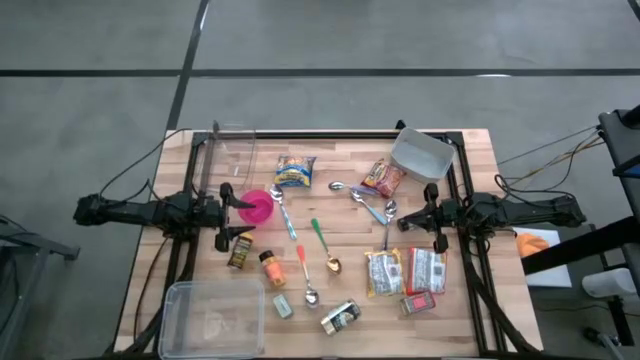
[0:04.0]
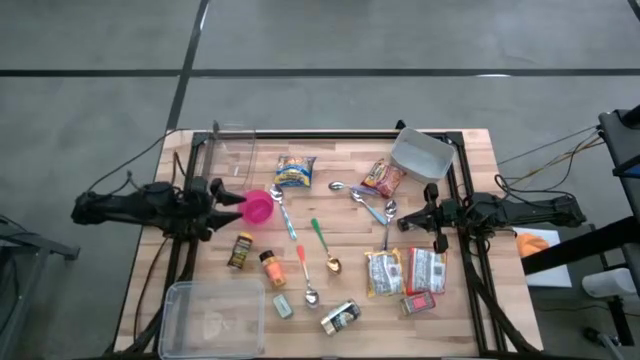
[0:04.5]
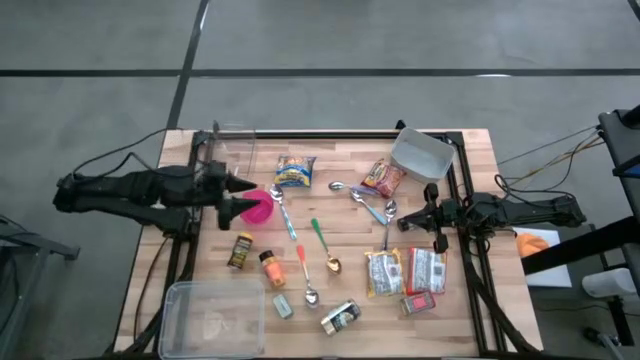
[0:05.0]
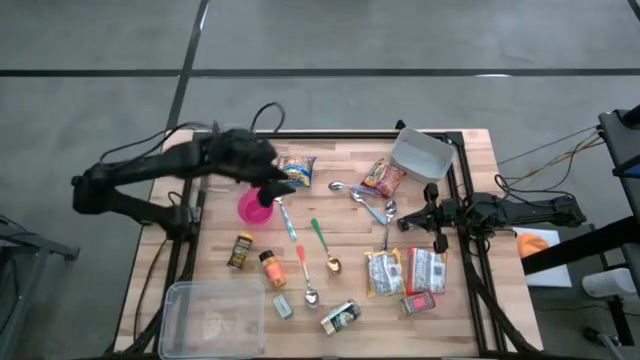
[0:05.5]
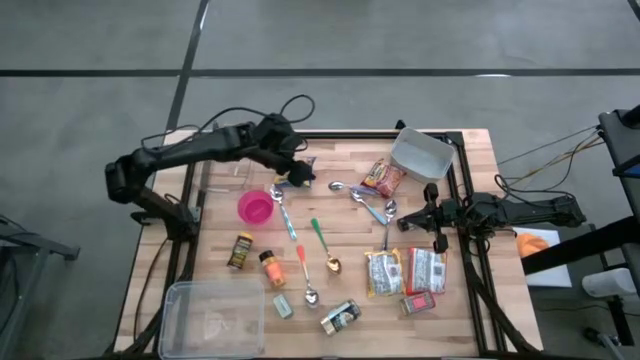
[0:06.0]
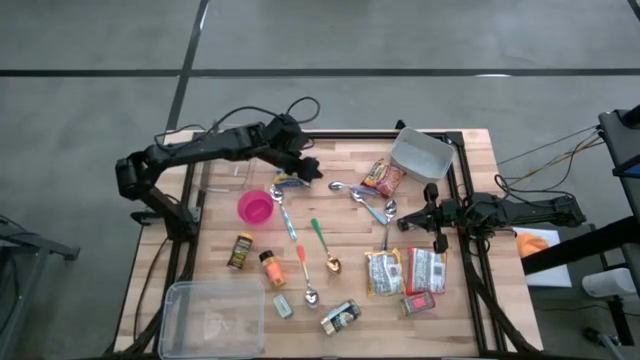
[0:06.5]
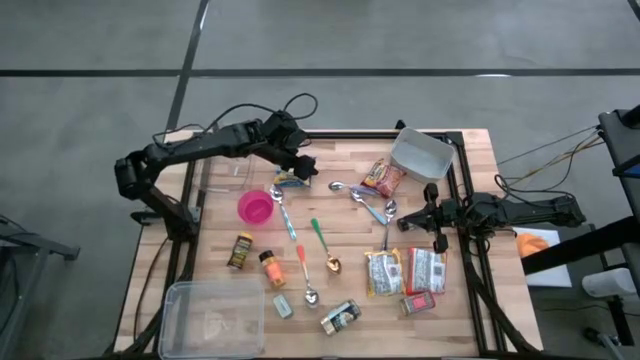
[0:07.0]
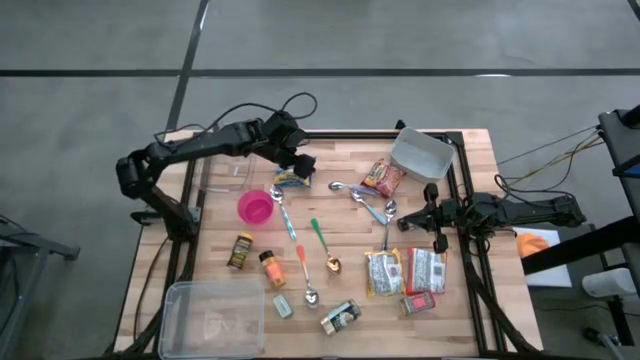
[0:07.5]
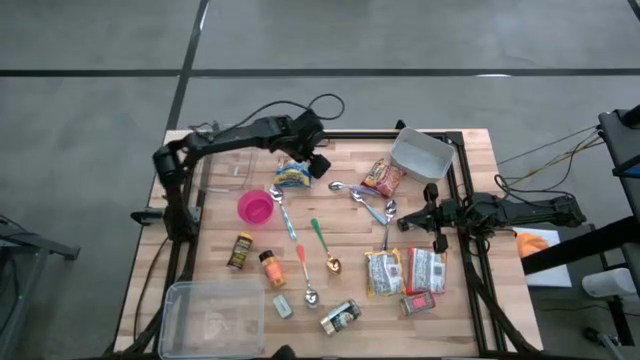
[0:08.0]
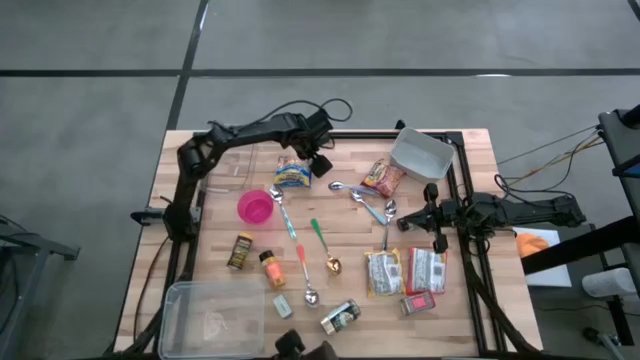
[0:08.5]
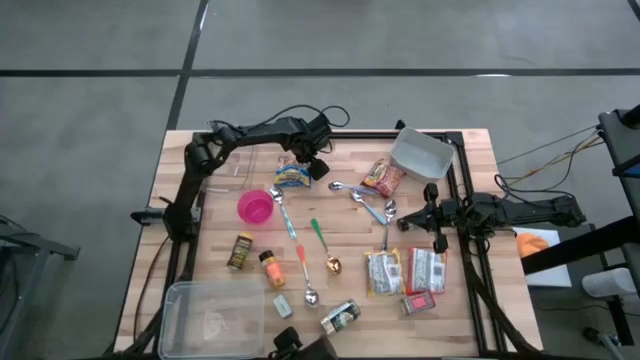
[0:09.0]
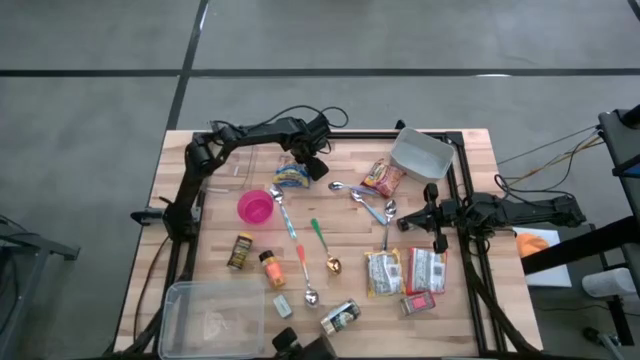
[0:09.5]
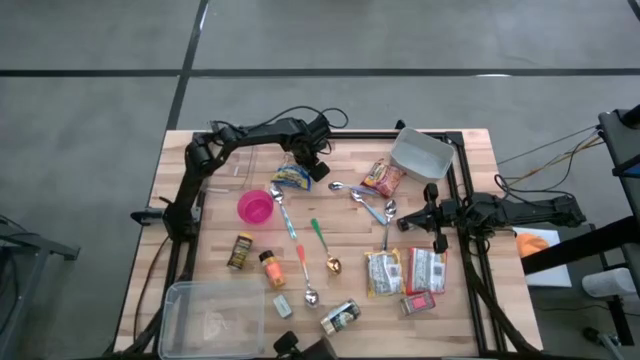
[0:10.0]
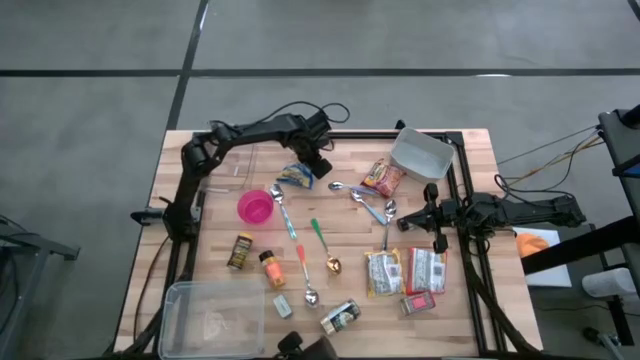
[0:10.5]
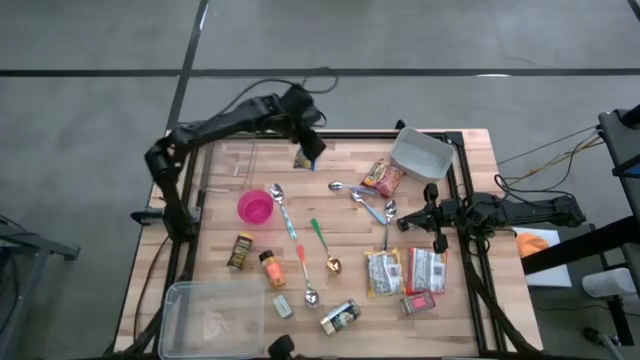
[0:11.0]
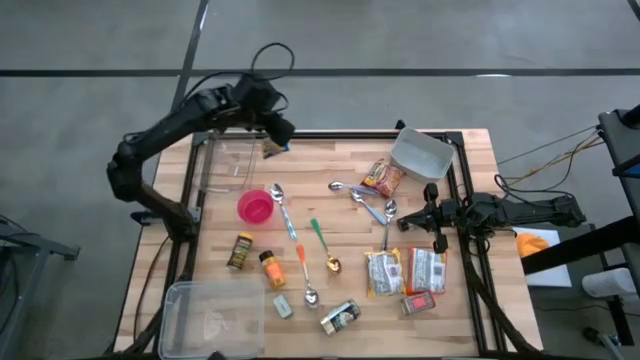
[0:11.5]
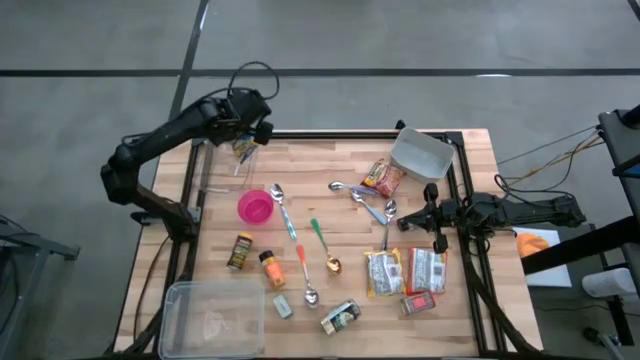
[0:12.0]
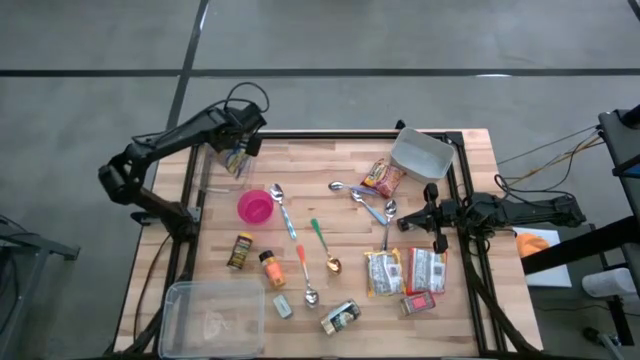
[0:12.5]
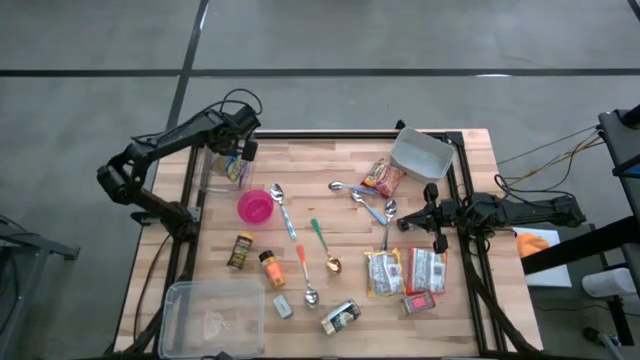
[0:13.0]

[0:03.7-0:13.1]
Put the blue noodle pack into the clear bin
